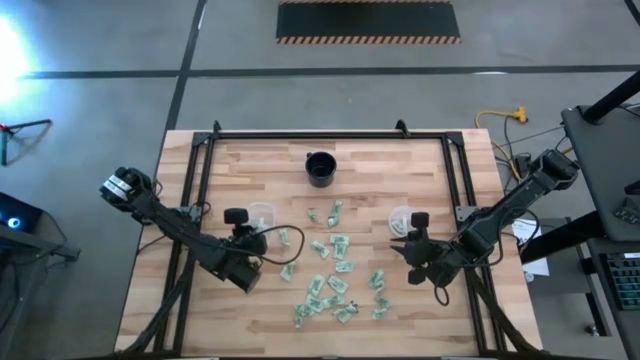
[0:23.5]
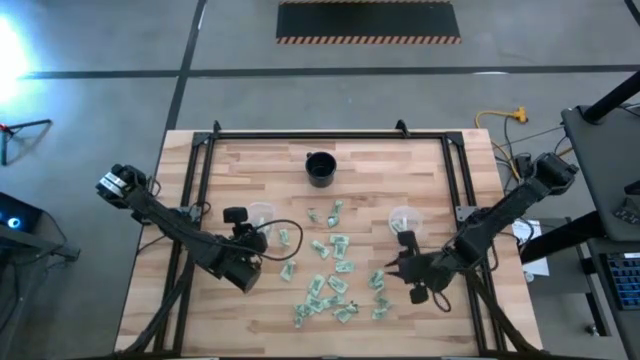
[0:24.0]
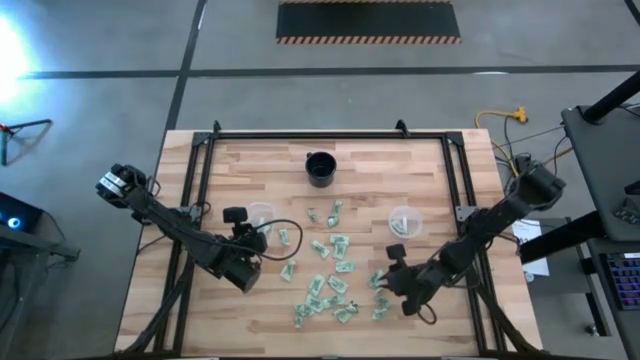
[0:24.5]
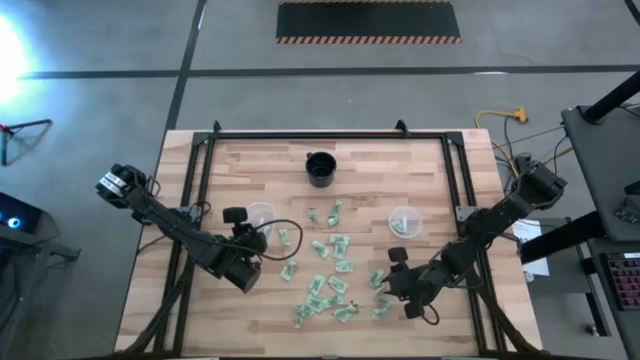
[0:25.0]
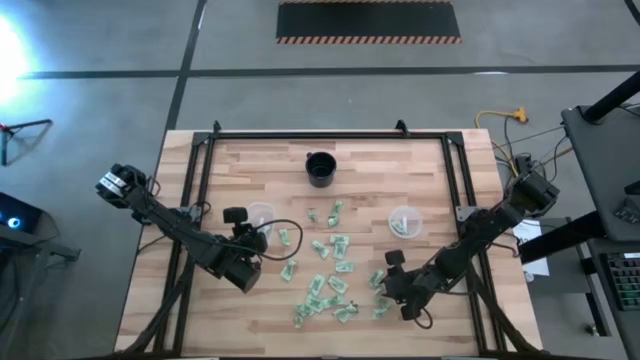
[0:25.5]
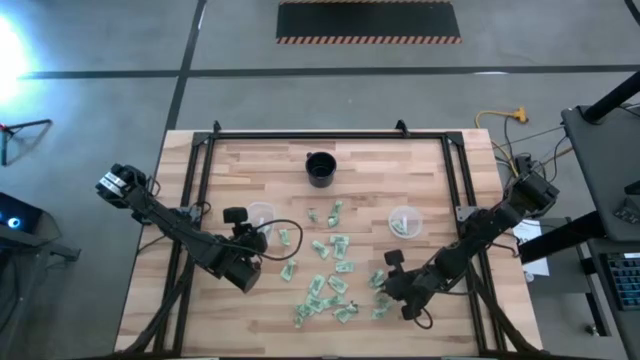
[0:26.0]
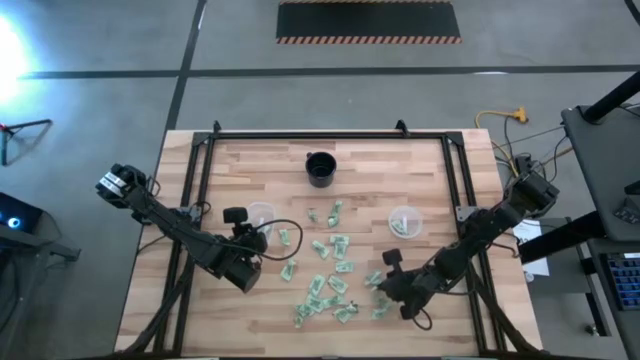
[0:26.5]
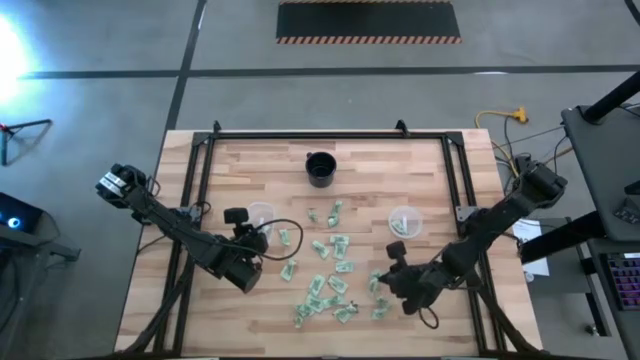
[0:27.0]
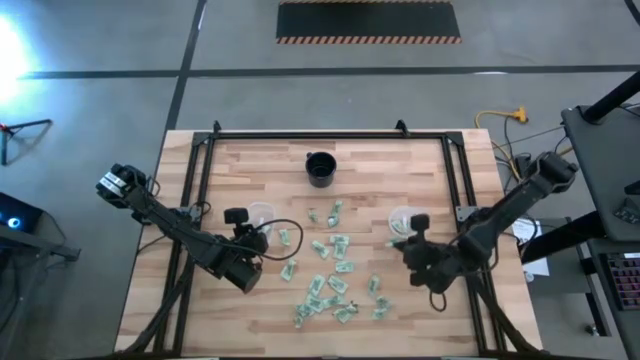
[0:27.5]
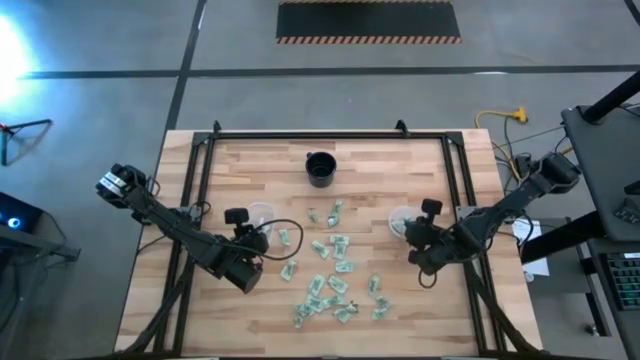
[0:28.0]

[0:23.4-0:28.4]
Task: Pick and place Stevia / Truvia into bins
Put the light green stevia packet into the circular container

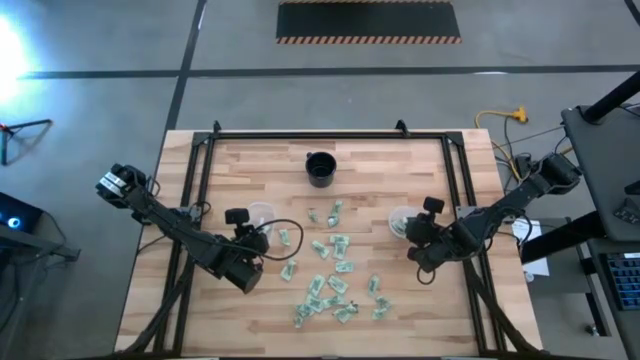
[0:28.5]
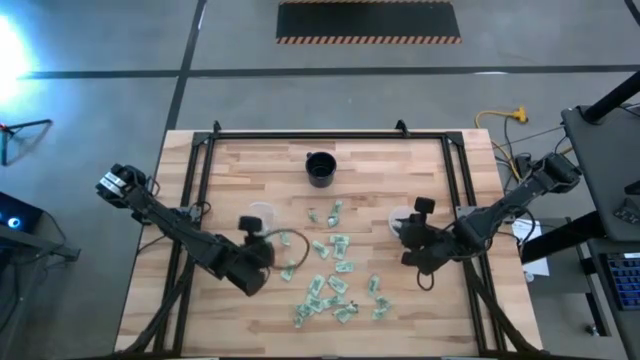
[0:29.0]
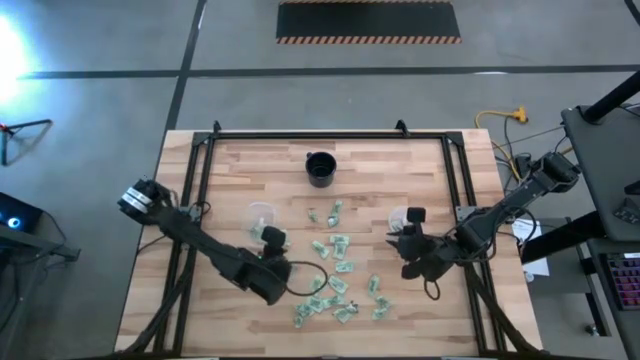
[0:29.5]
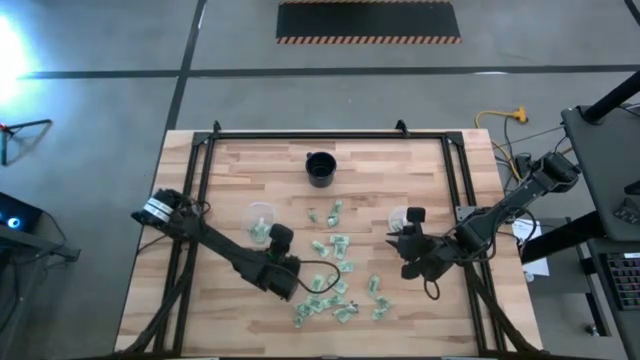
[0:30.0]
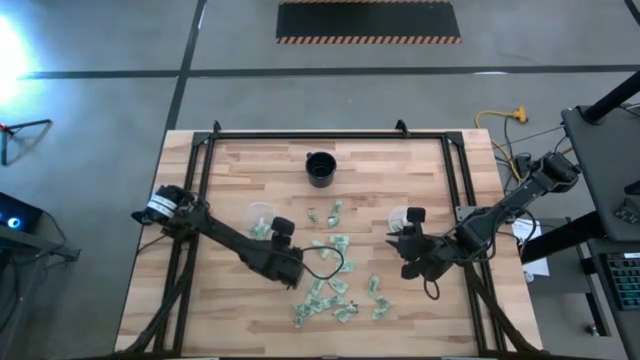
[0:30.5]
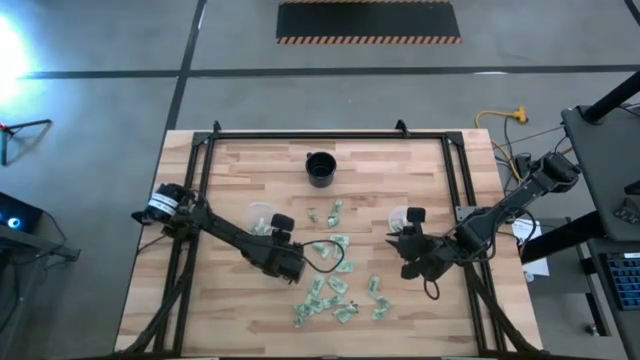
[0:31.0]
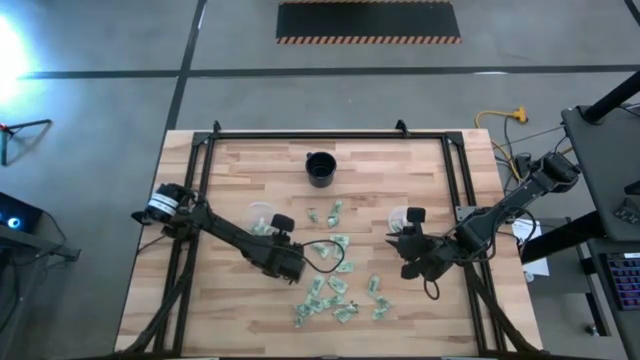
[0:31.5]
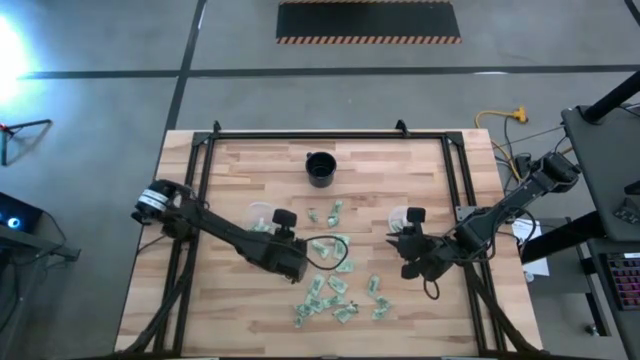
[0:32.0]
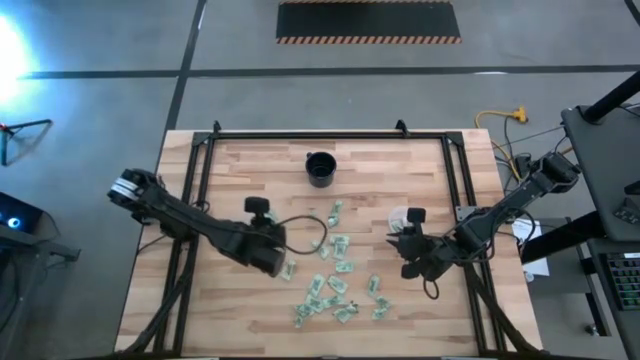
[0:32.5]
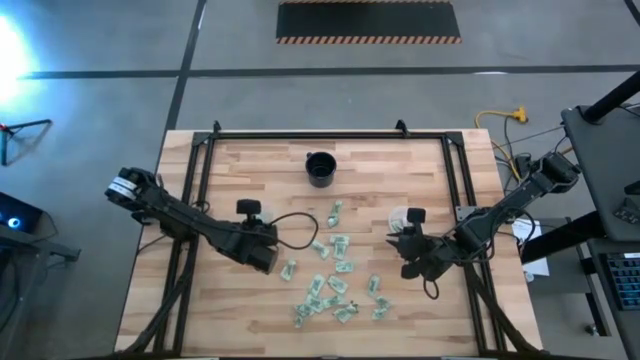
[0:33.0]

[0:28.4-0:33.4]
Put the light green stevia packet into the rectangular container

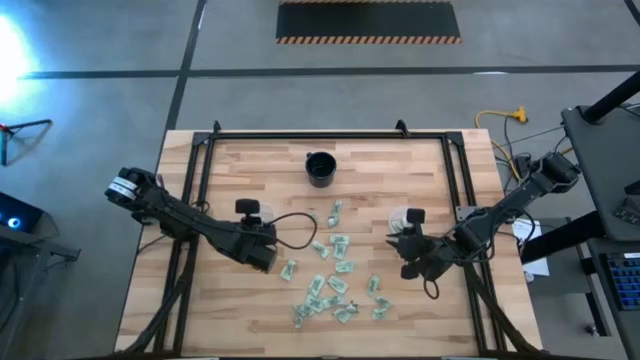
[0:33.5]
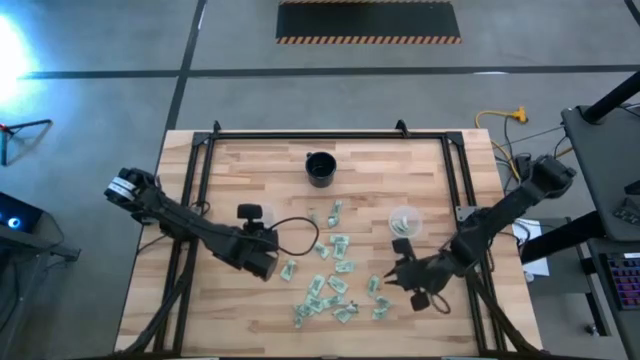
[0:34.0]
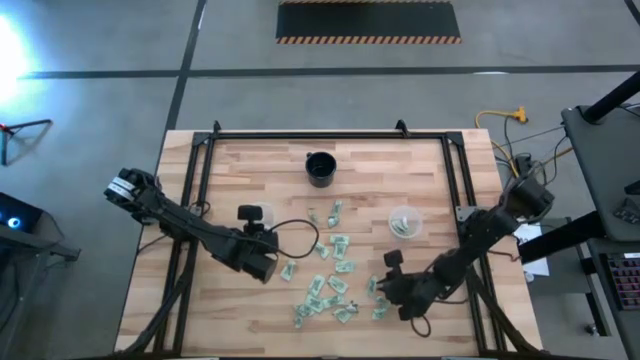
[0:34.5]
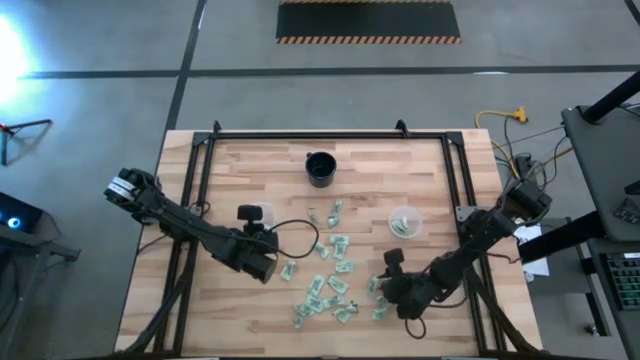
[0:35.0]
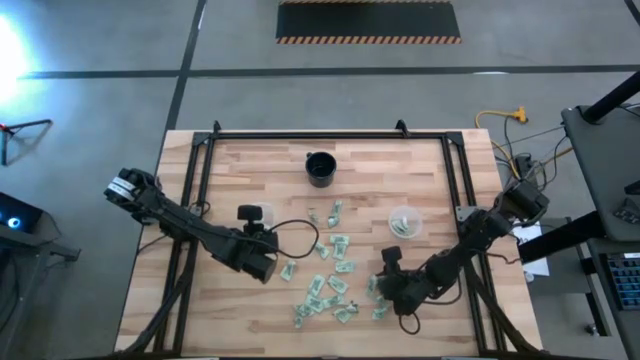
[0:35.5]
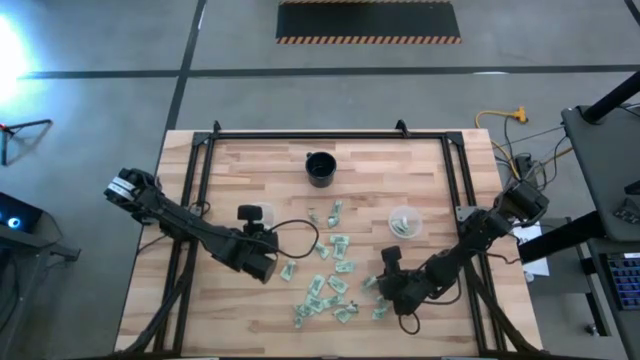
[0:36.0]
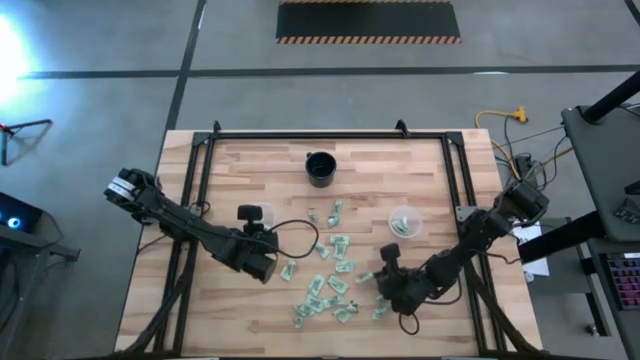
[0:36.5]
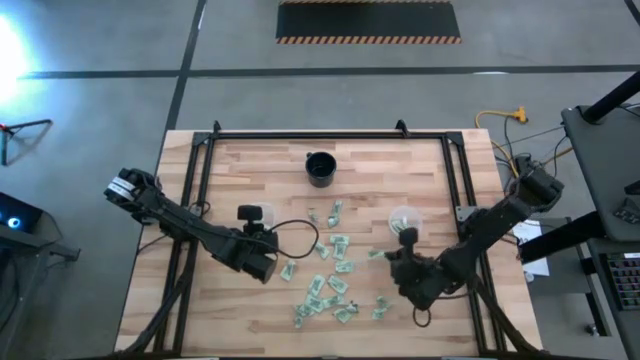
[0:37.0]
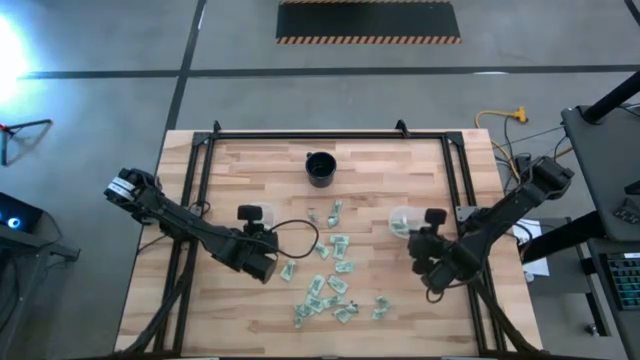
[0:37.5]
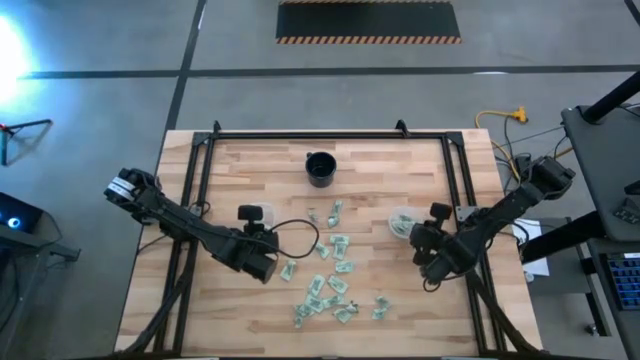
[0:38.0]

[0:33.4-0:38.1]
Put the light green stevia packet into the circular container

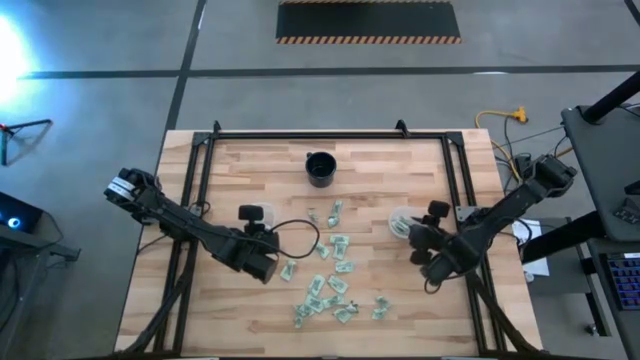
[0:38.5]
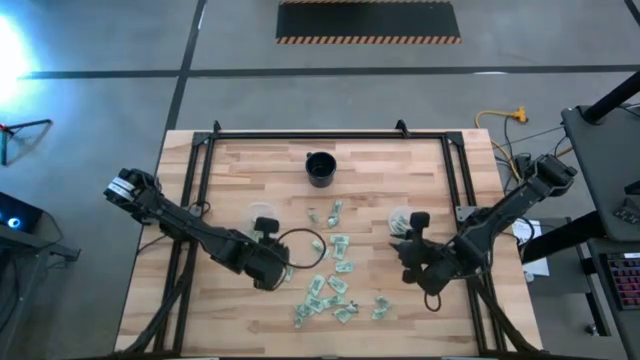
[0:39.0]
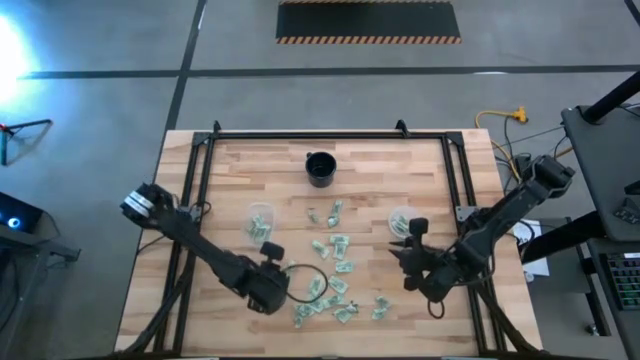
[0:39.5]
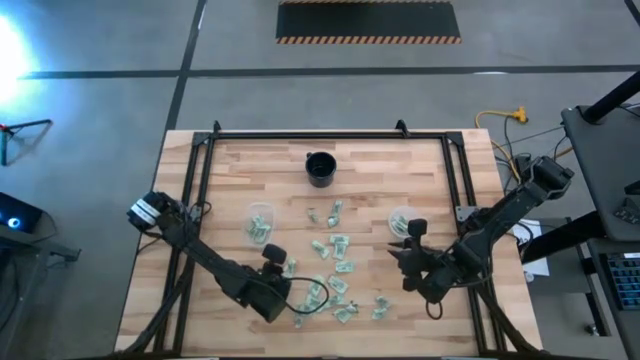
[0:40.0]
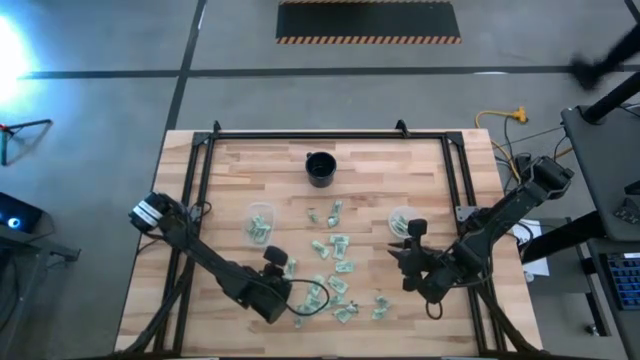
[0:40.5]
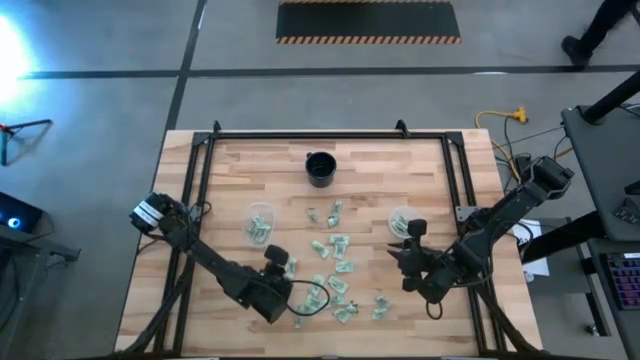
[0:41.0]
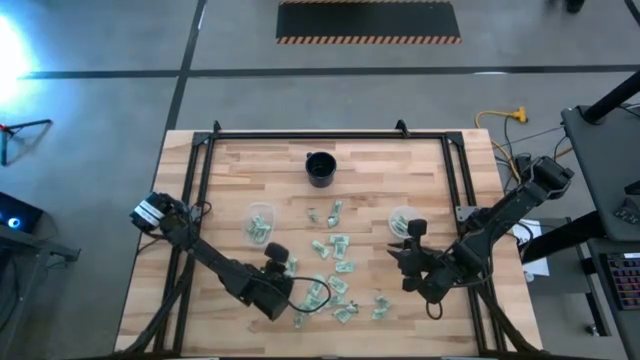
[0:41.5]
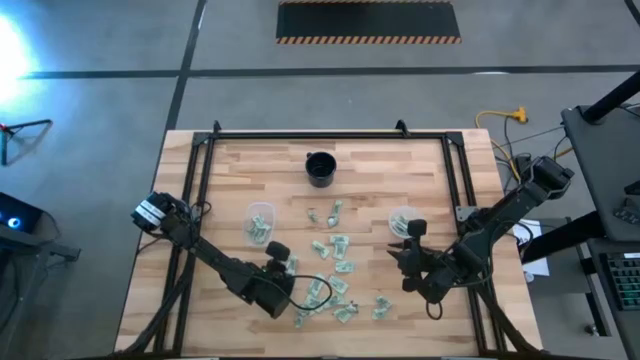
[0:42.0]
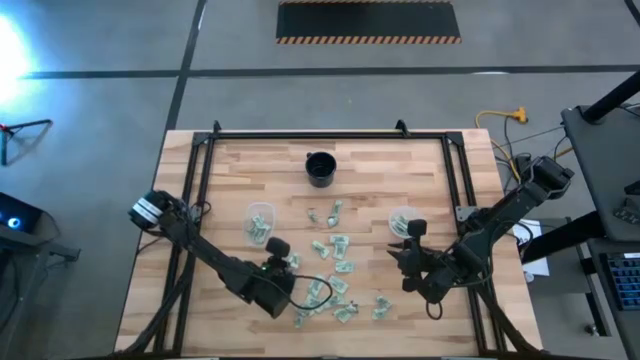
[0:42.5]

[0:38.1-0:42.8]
Put the light green stevia packet into the rectangular container

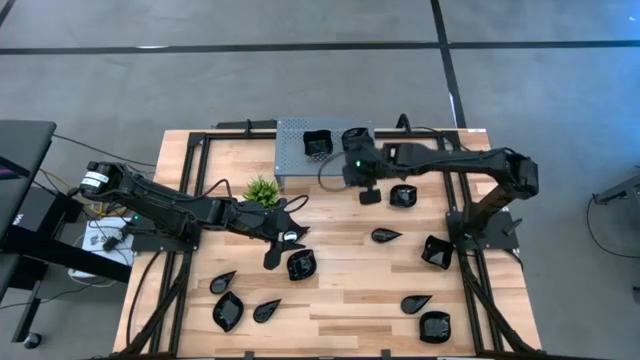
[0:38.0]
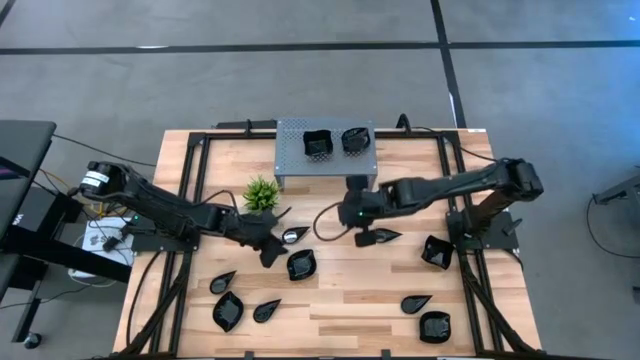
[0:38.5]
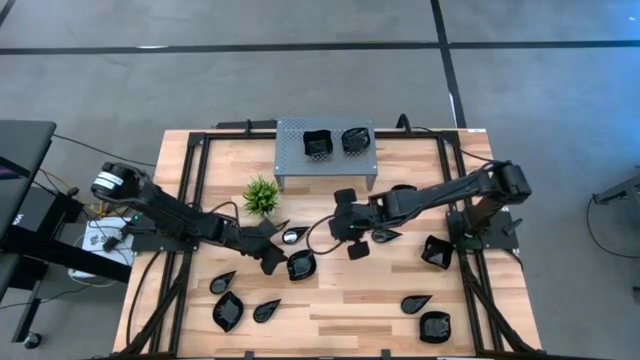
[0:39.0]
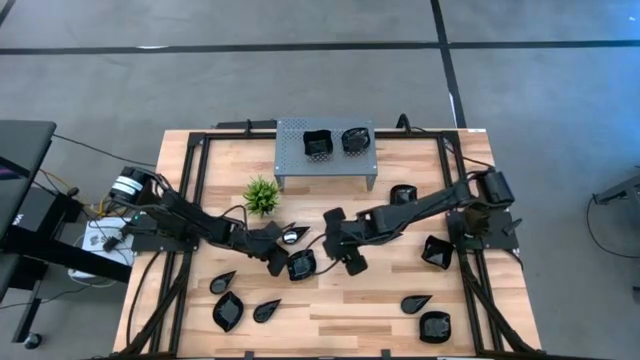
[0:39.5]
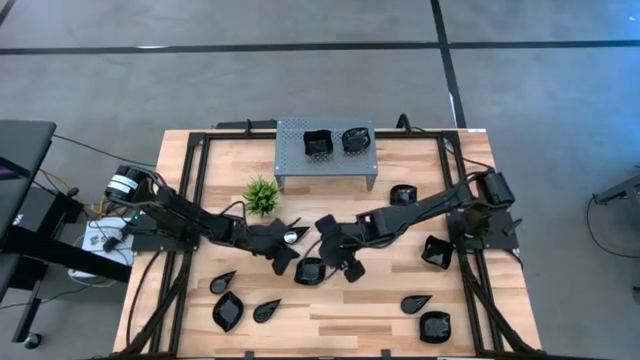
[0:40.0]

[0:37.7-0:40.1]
Task: Pick & Place Mini shaped plates
Stack the black leaf-shaped plate on top of the black leaf-shaped plate on the shelf
